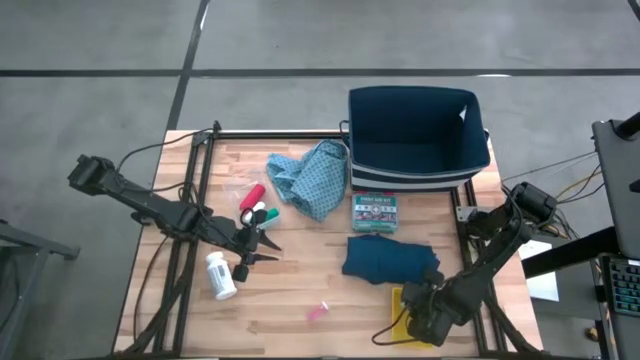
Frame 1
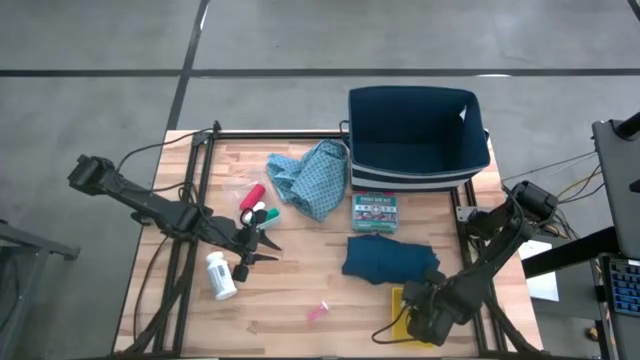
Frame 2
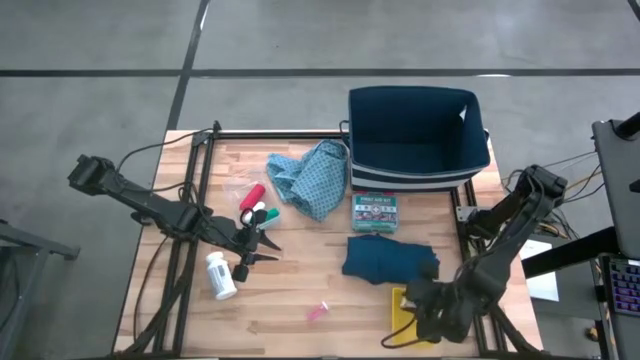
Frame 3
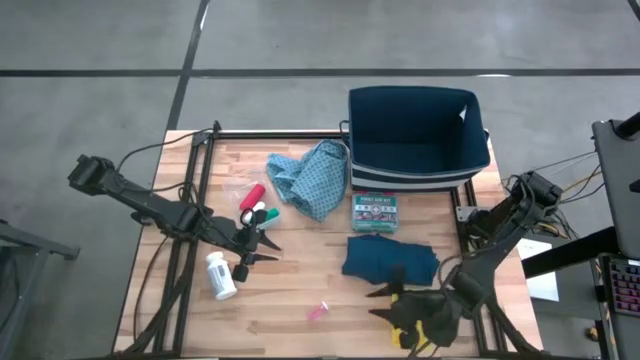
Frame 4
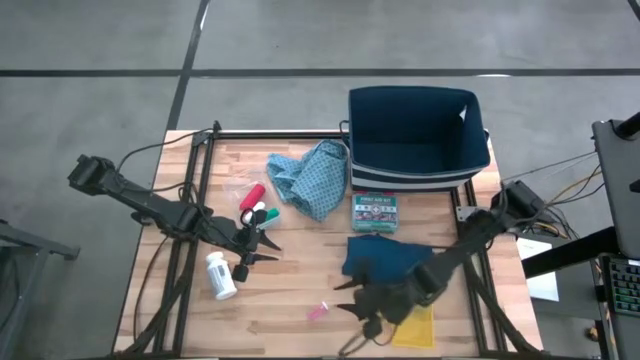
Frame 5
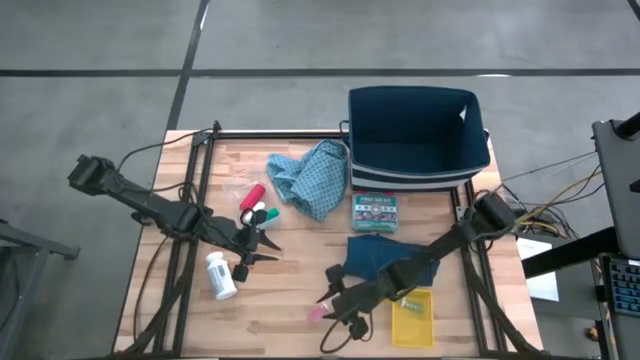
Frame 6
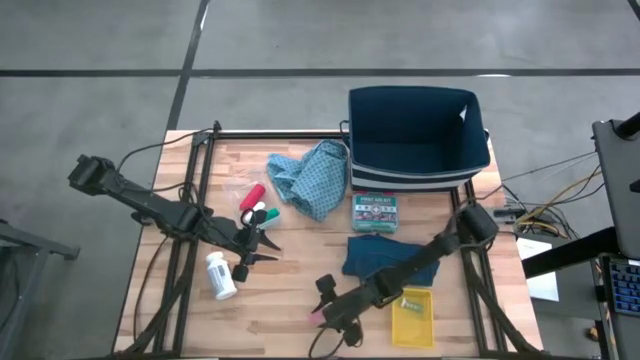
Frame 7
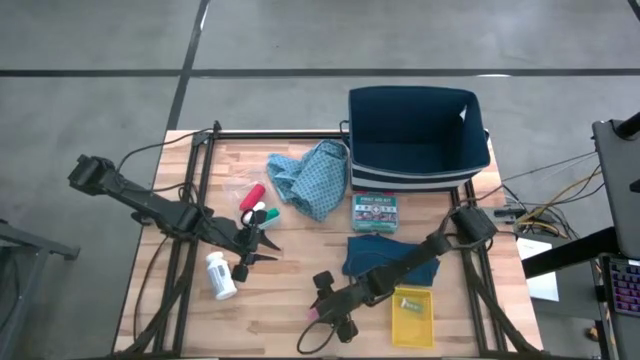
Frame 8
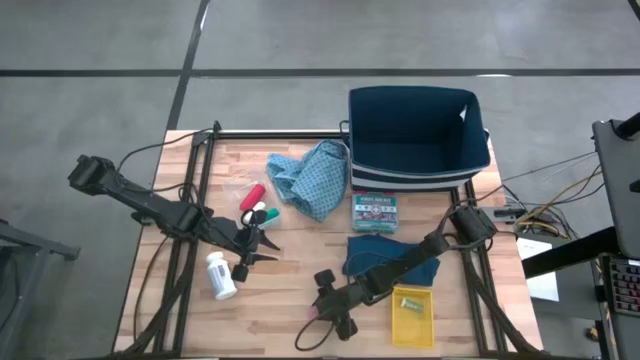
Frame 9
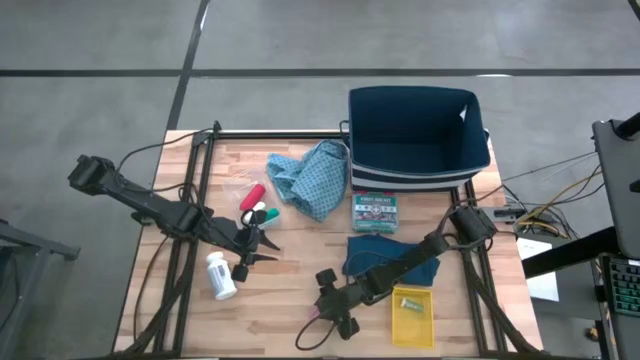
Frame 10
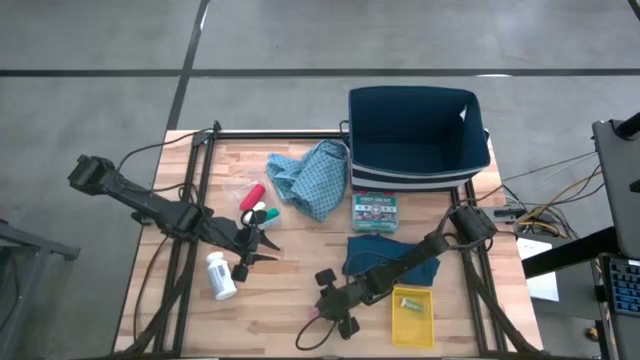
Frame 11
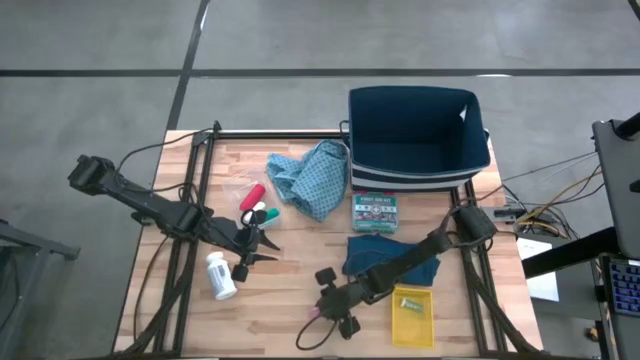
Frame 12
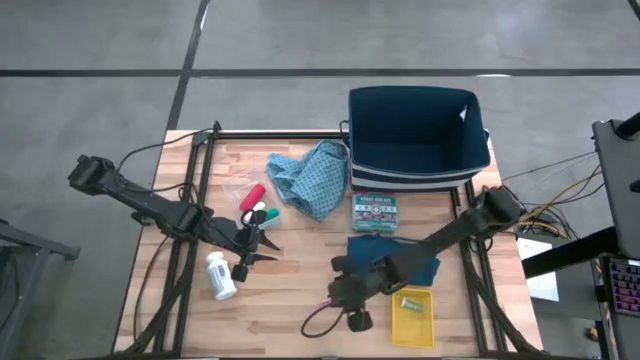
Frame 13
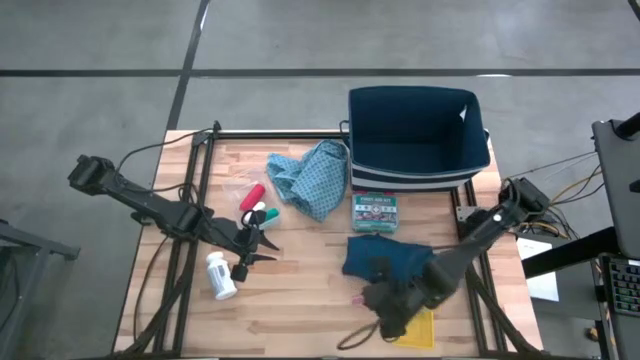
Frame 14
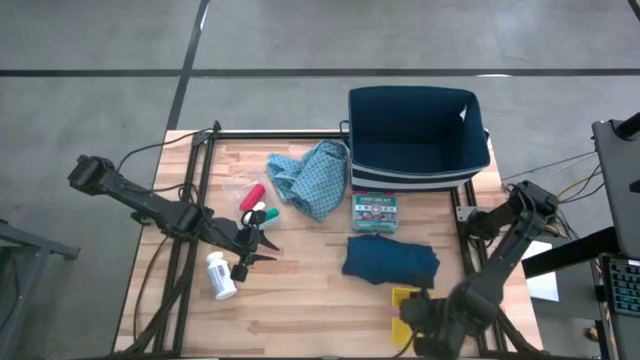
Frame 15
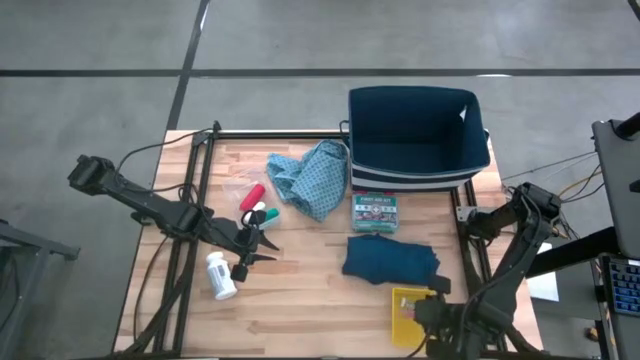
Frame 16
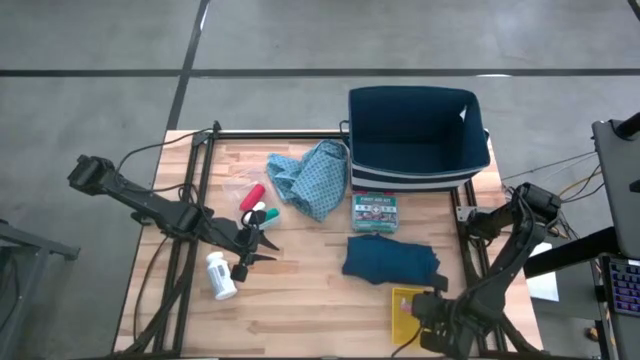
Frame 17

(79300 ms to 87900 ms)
Task: Pick & place medical supplies in basket/bin
Put the pink pill bottle into the yellow bin

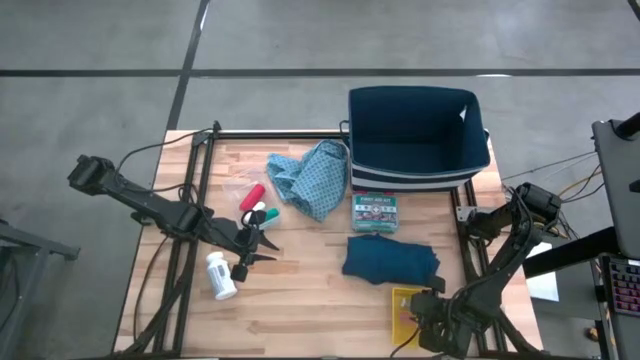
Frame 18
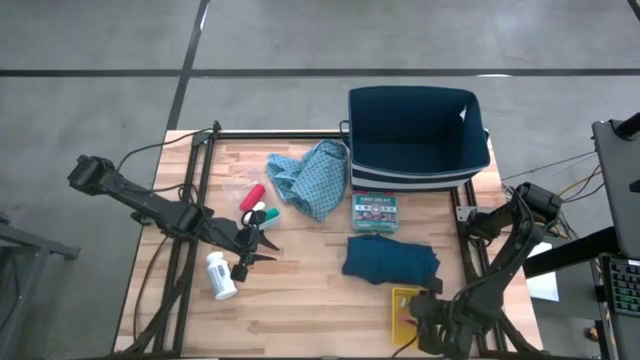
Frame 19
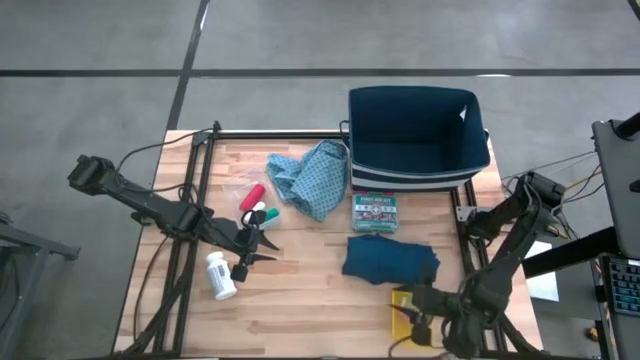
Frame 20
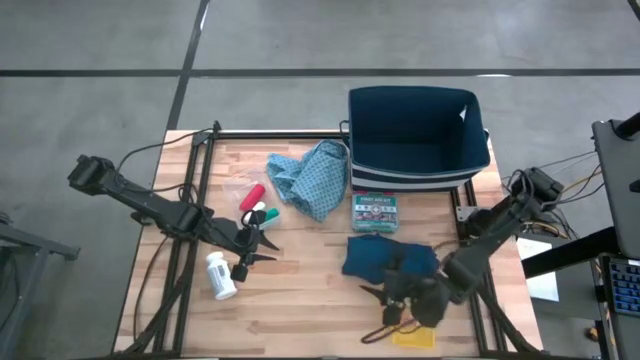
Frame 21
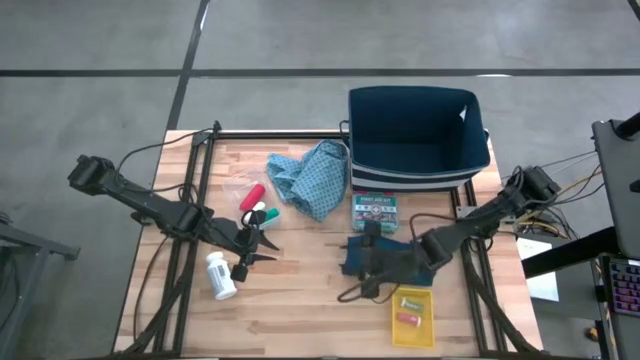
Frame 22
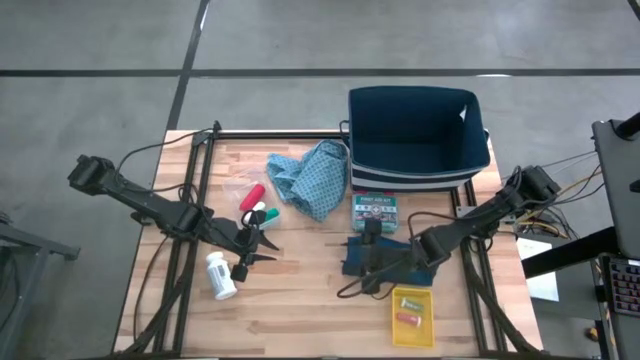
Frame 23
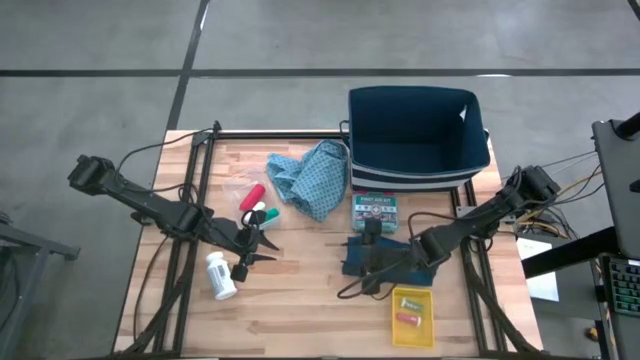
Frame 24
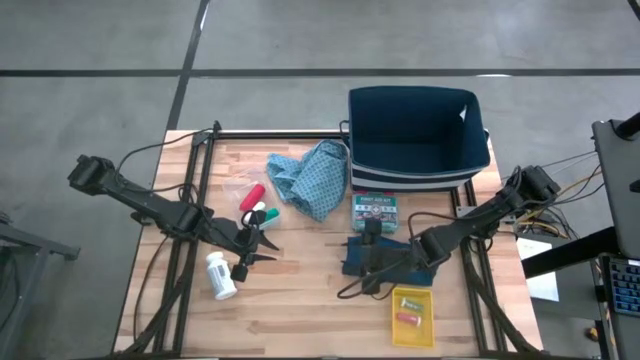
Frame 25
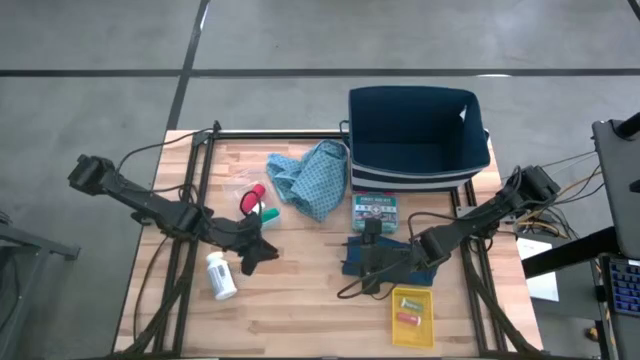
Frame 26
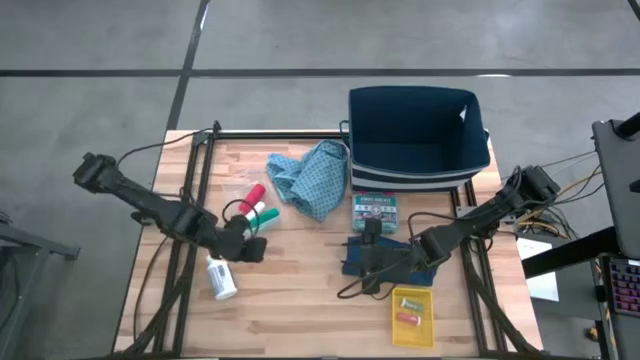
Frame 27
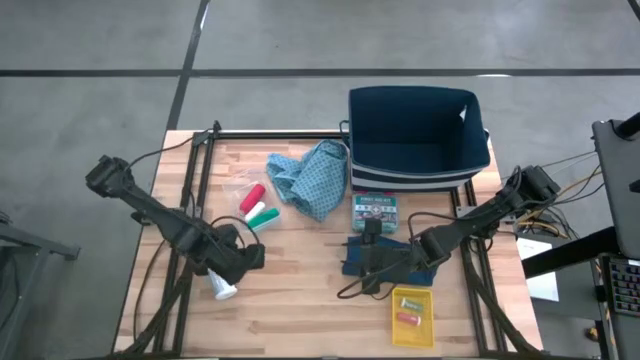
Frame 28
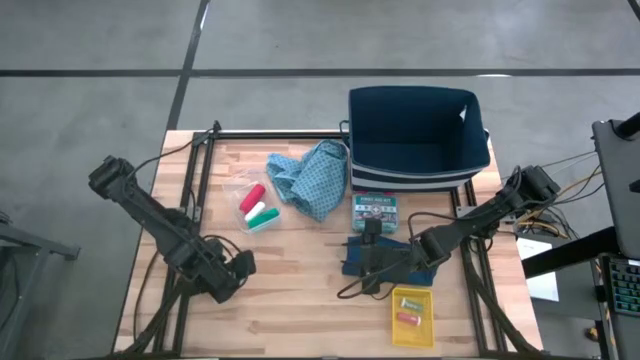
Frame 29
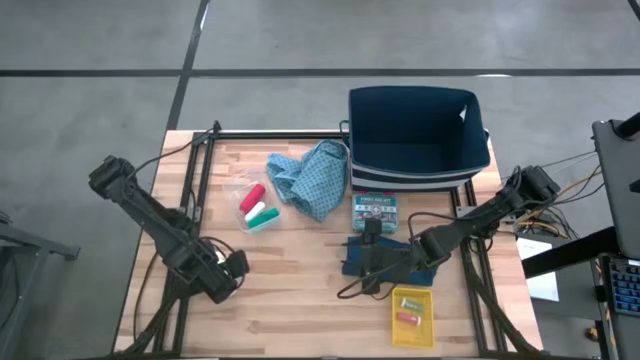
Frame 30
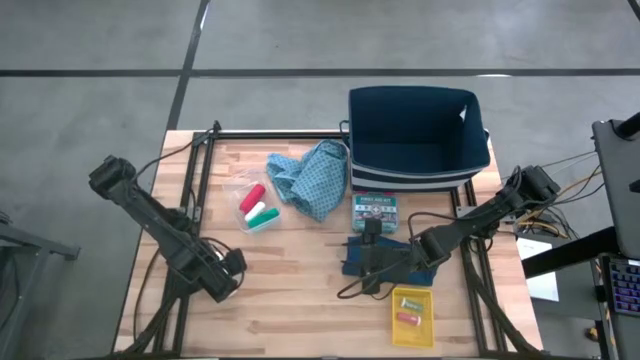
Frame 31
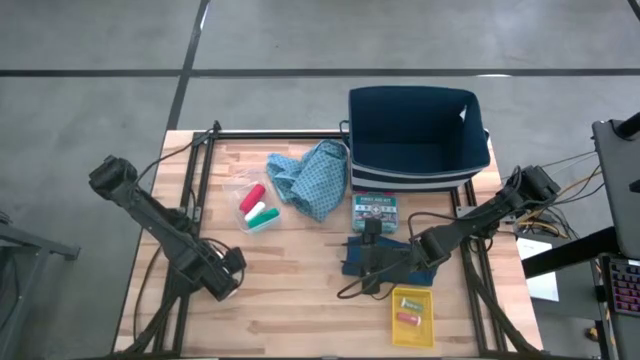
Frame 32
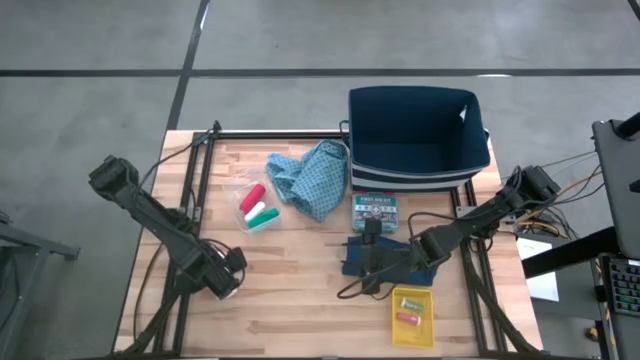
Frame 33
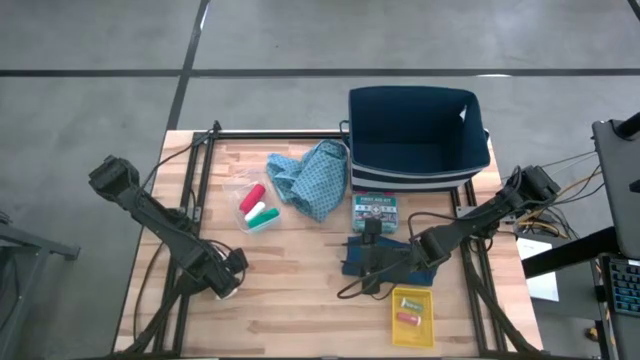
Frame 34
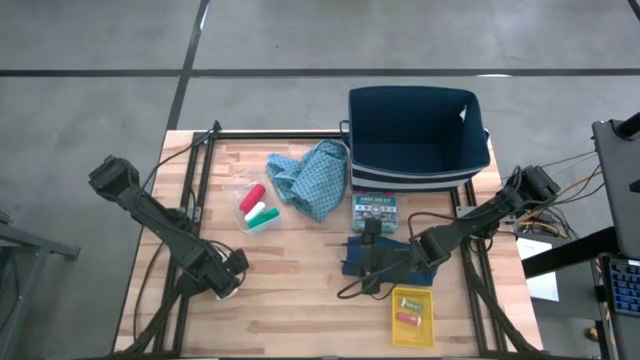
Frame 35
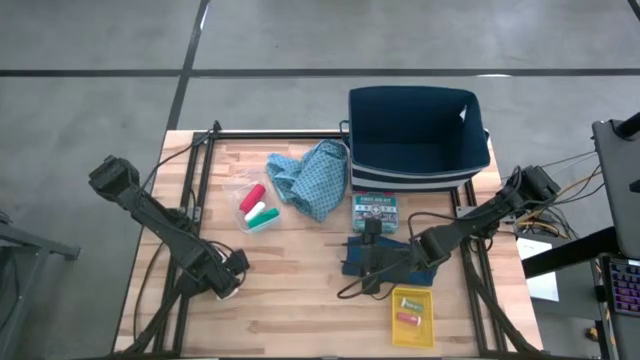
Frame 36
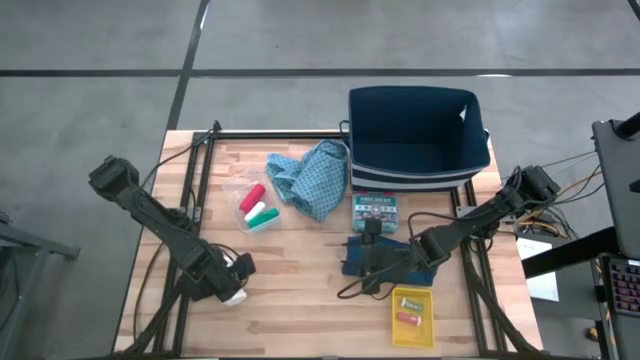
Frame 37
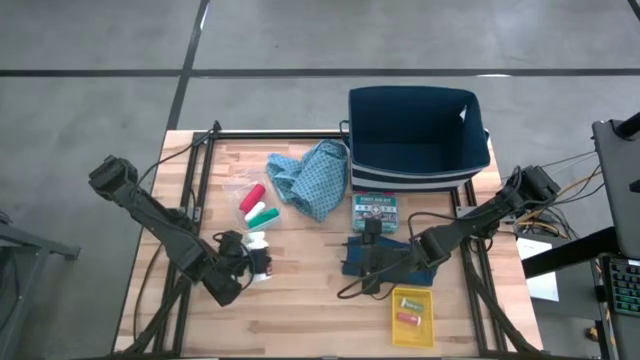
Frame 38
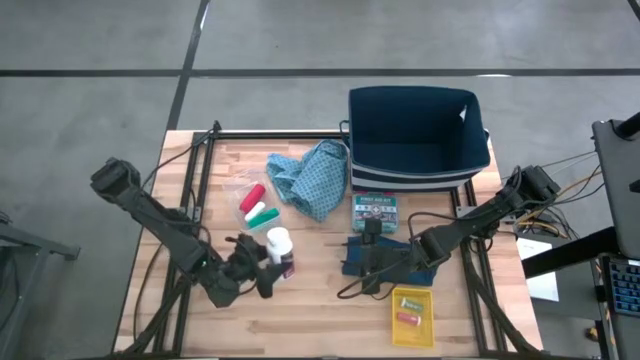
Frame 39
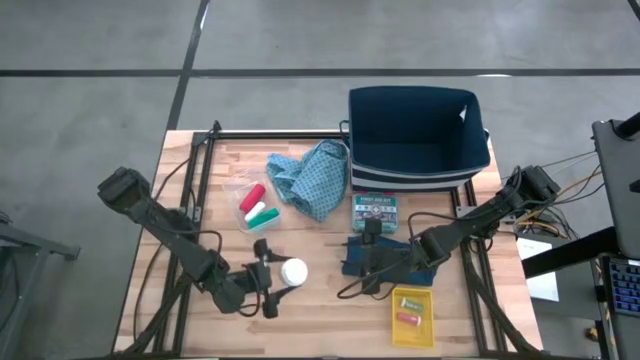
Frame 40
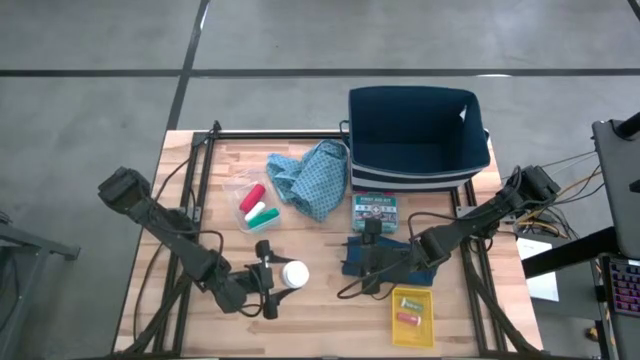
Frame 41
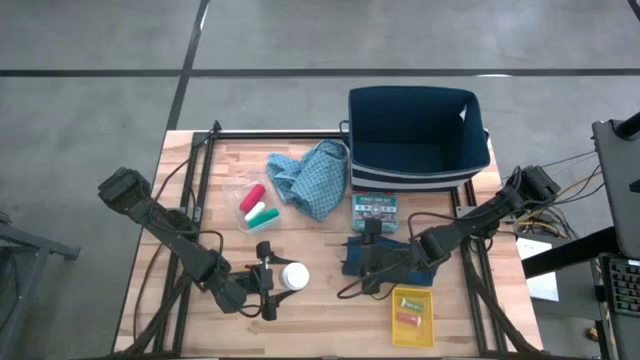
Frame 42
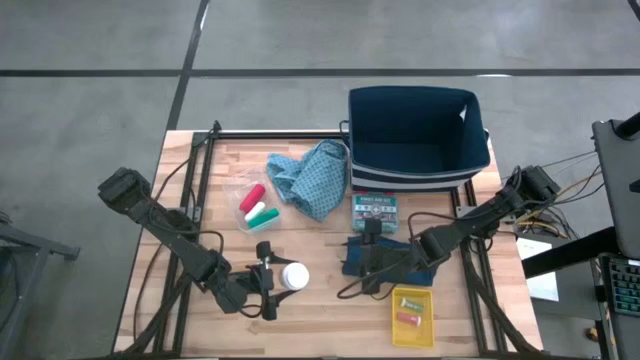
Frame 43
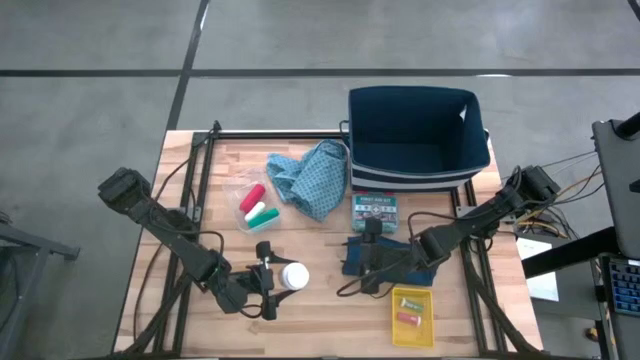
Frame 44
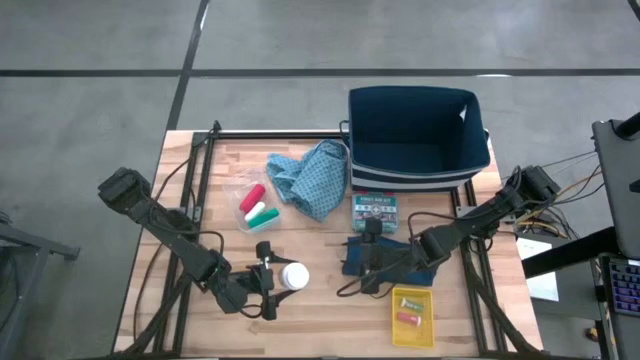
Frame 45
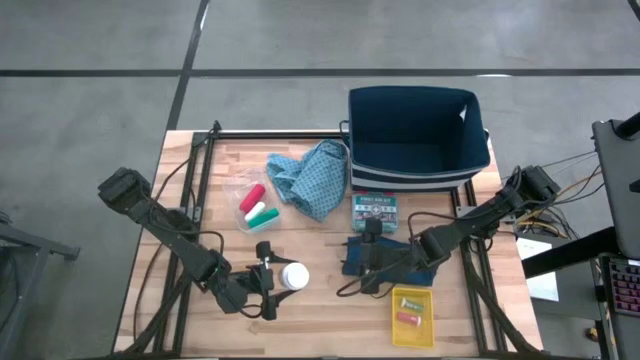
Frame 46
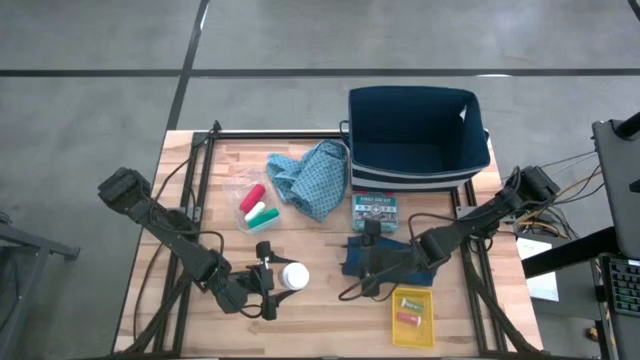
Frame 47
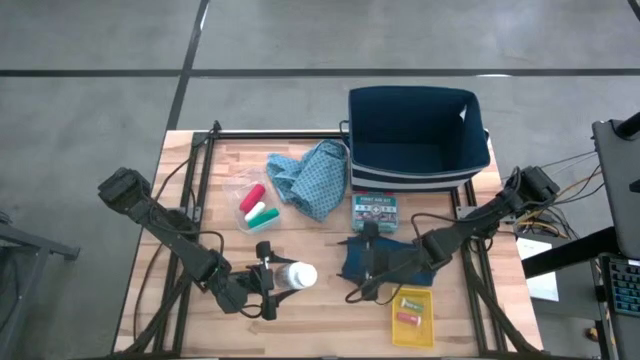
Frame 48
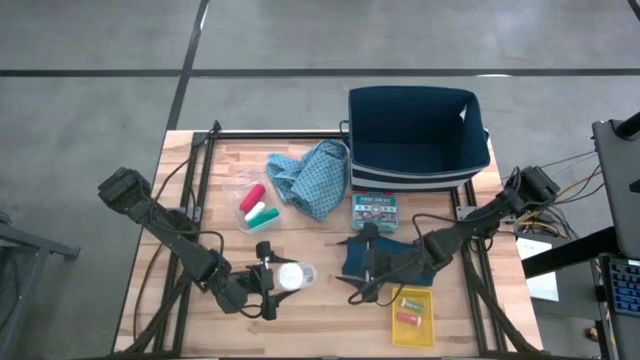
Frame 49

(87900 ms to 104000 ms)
Put the white pill bottle into the yellow bin
